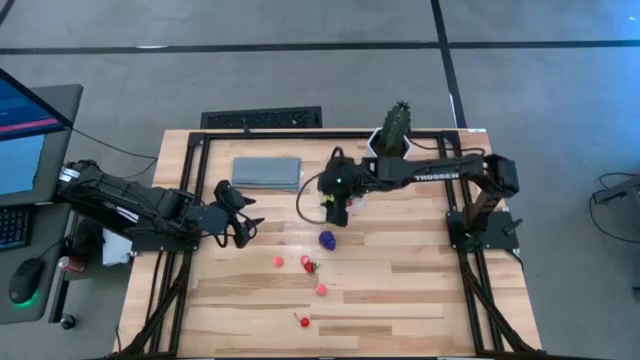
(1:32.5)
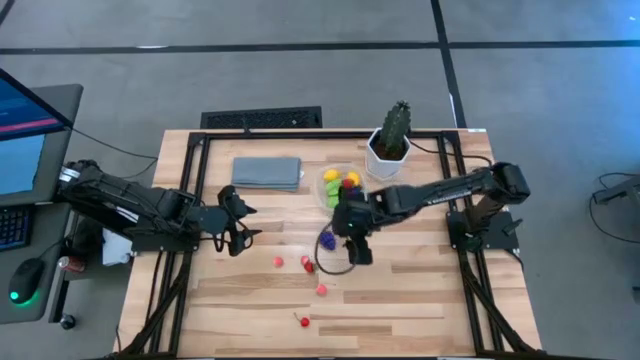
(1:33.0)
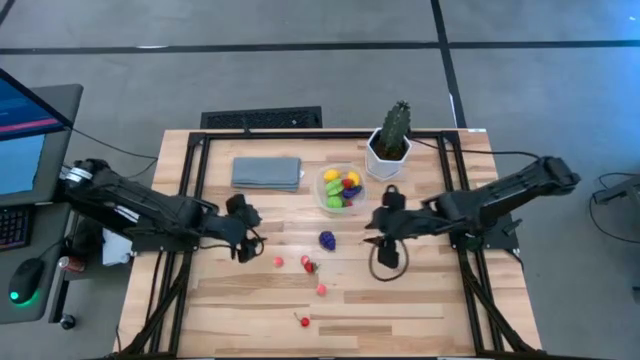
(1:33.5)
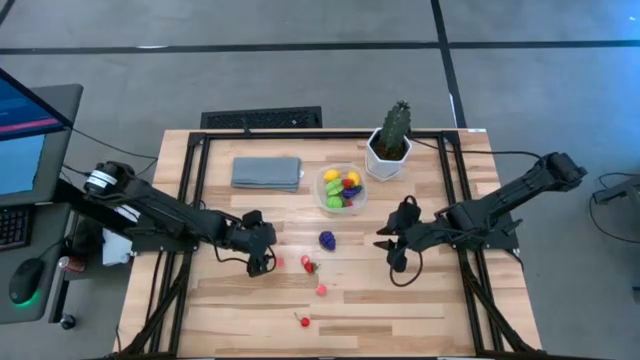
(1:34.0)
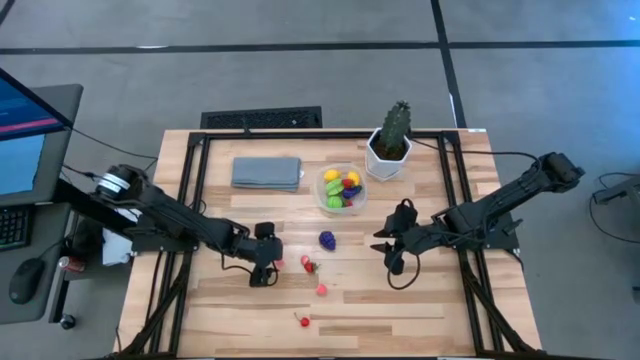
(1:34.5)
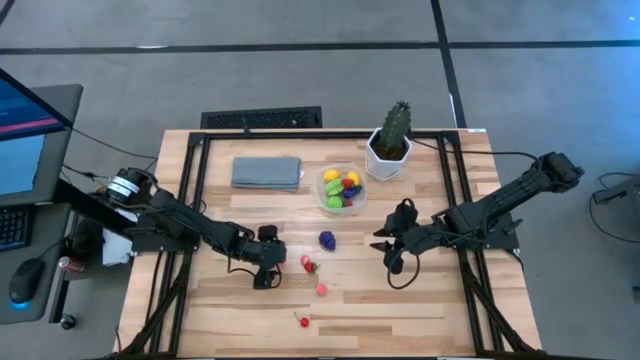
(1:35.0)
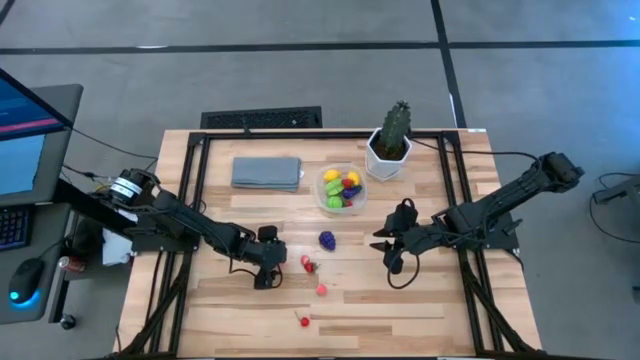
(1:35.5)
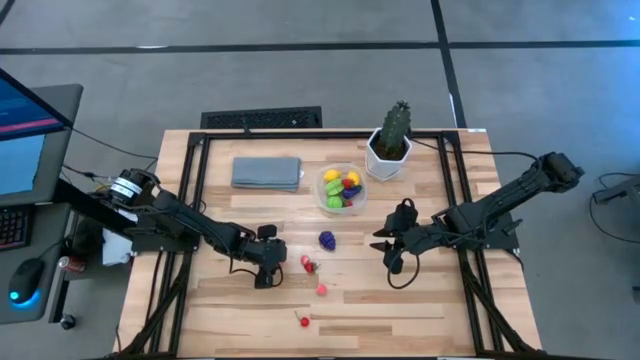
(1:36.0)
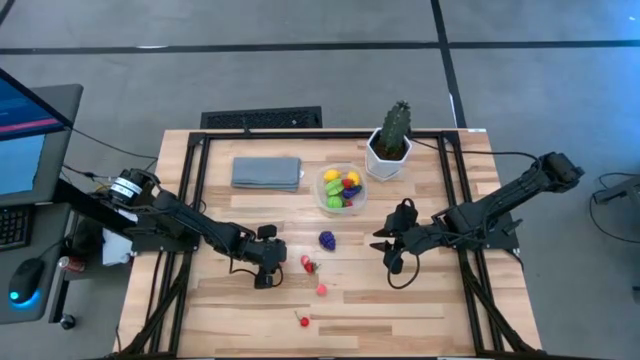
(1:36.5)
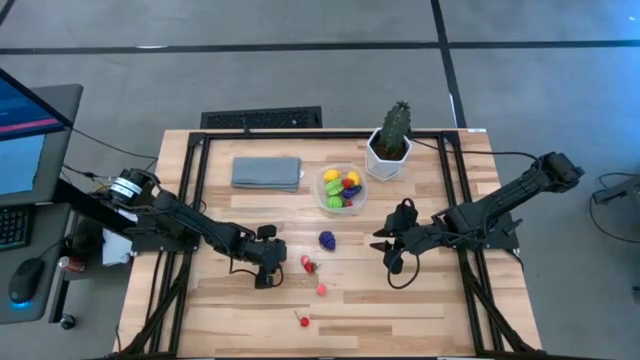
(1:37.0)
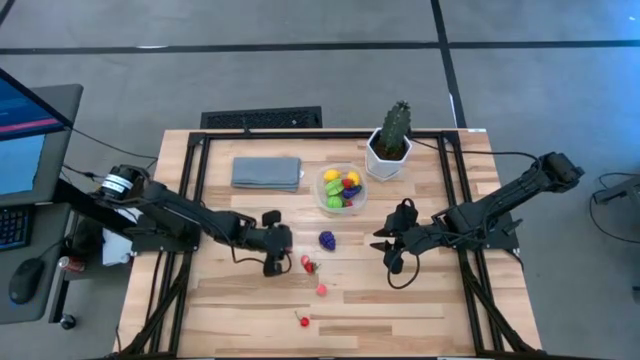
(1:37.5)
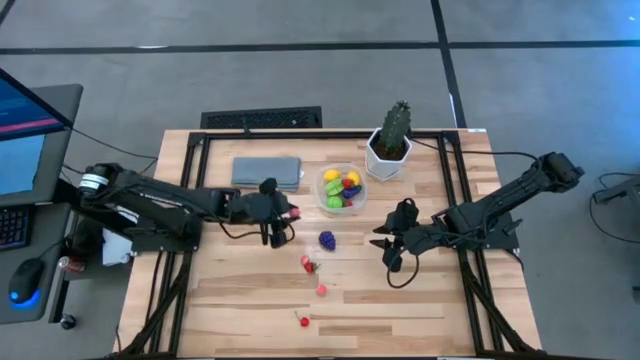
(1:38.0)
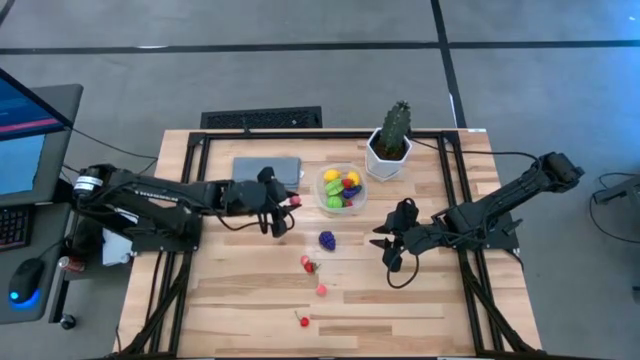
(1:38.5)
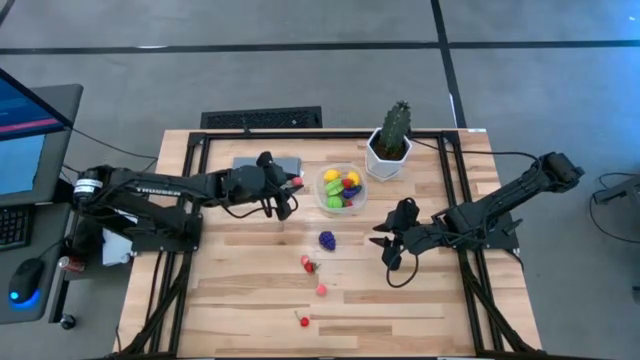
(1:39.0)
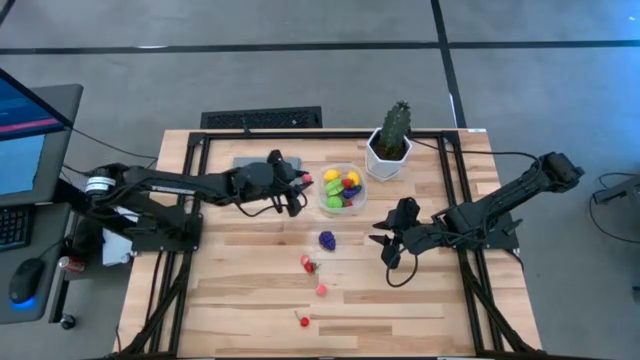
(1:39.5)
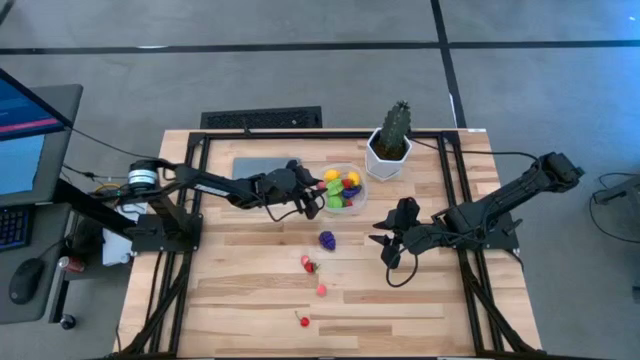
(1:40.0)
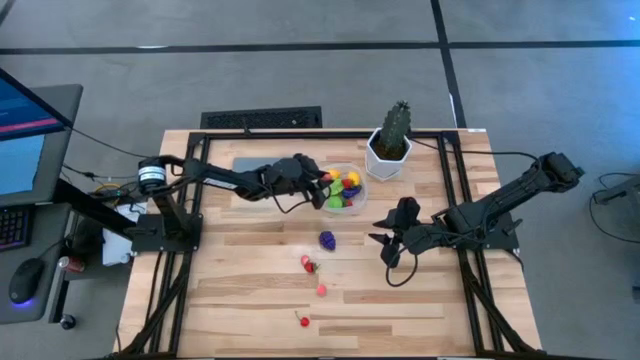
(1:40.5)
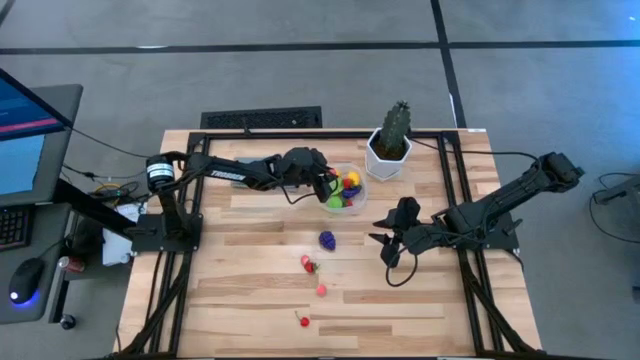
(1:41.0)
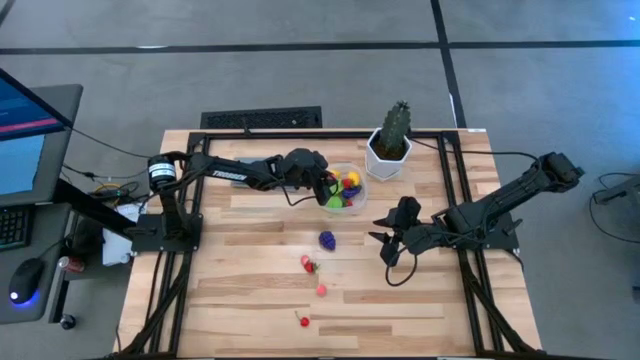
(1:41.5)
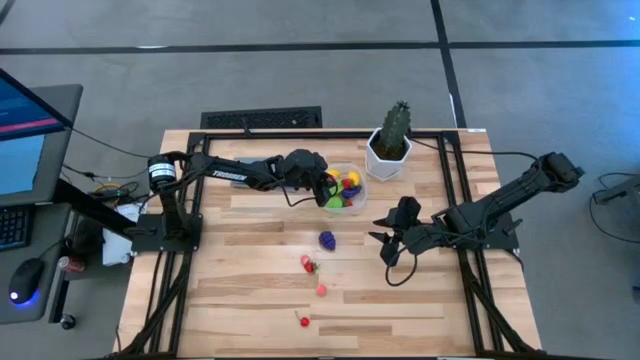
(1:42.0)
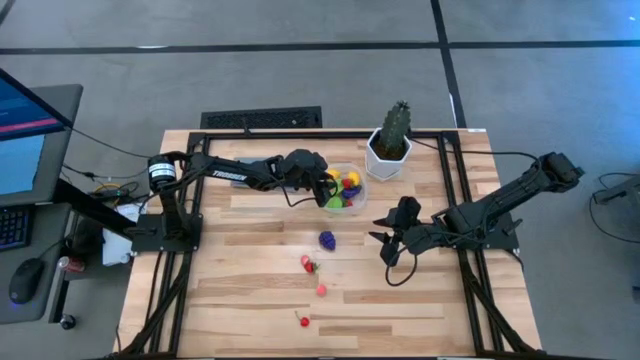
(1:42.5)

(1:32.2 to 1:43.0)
Task: Pick and placing Produce into tupperware
Put the top left peach into the transparent bin

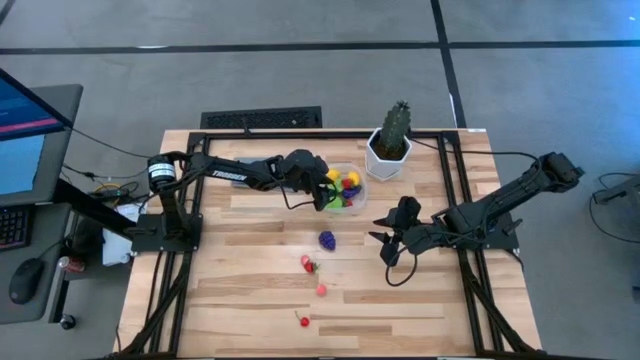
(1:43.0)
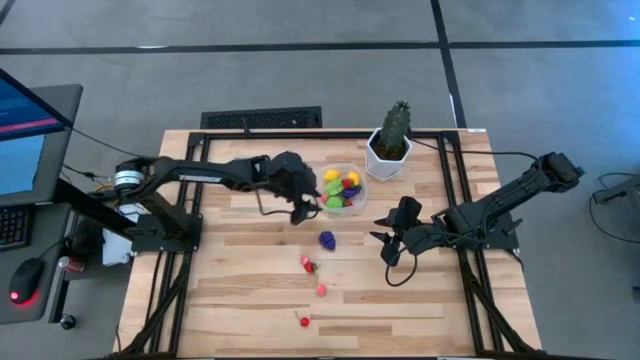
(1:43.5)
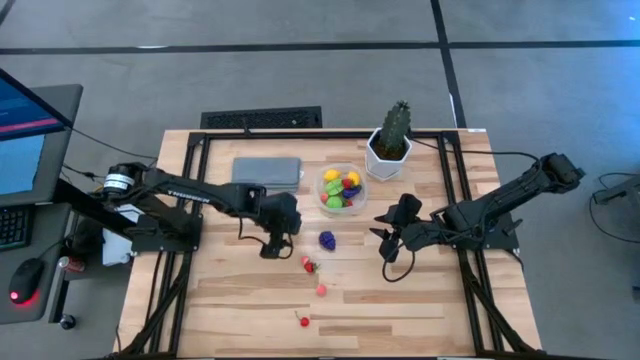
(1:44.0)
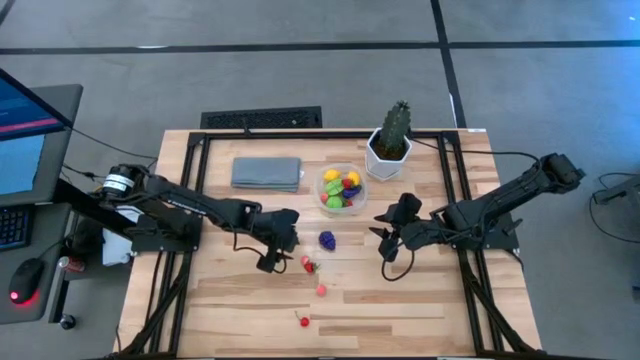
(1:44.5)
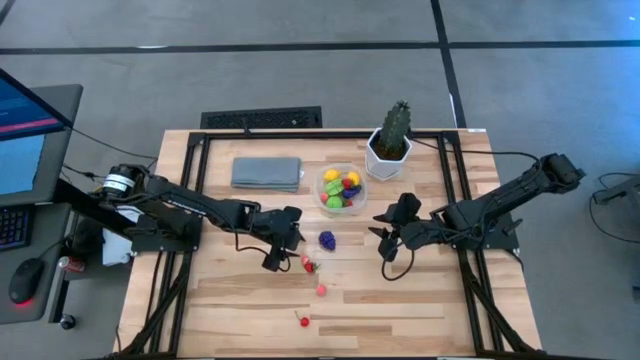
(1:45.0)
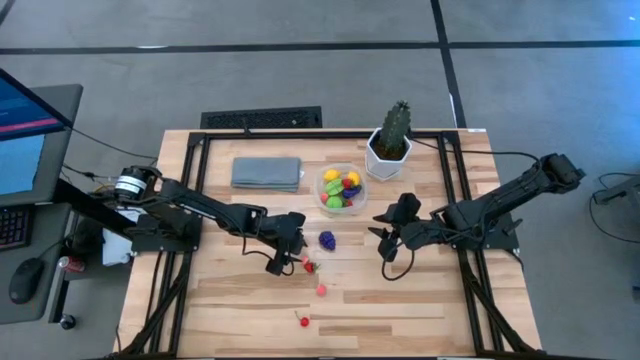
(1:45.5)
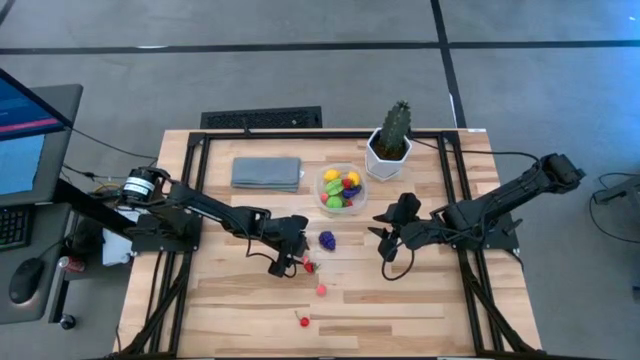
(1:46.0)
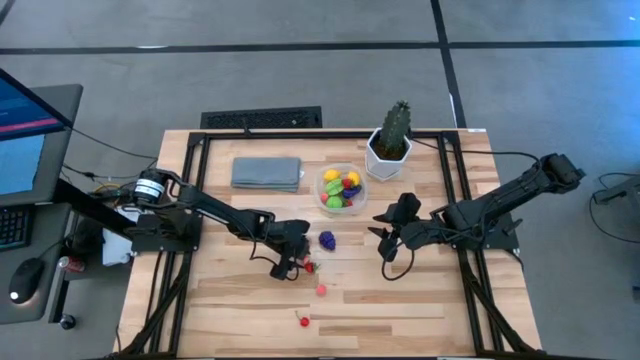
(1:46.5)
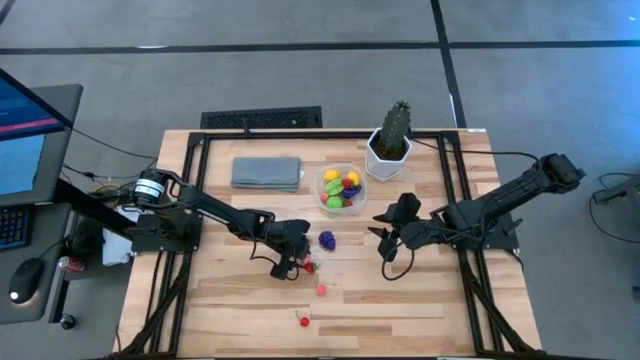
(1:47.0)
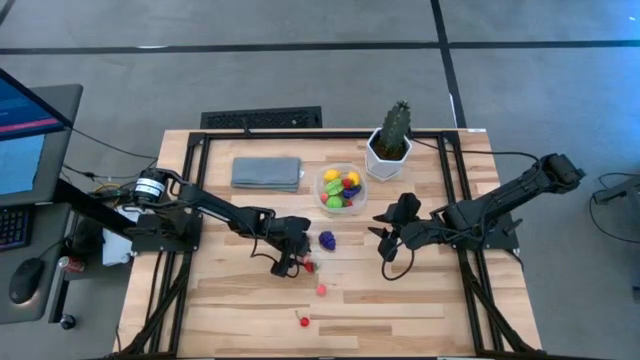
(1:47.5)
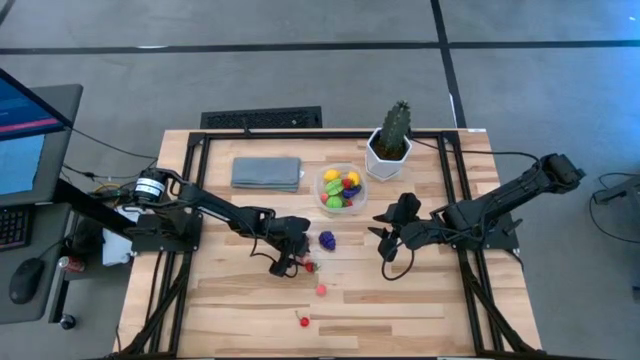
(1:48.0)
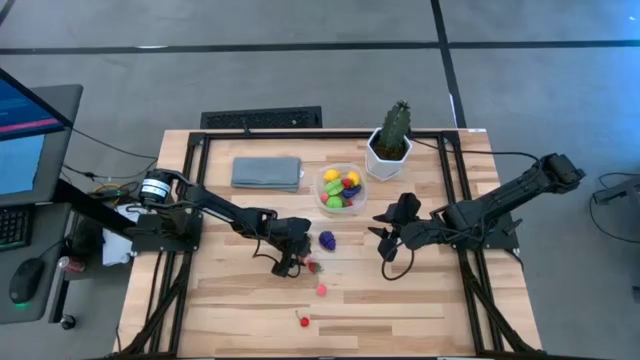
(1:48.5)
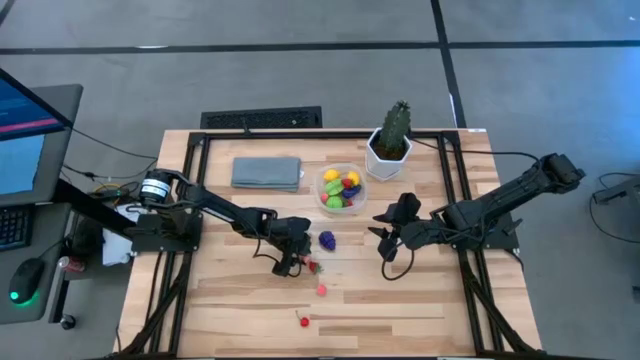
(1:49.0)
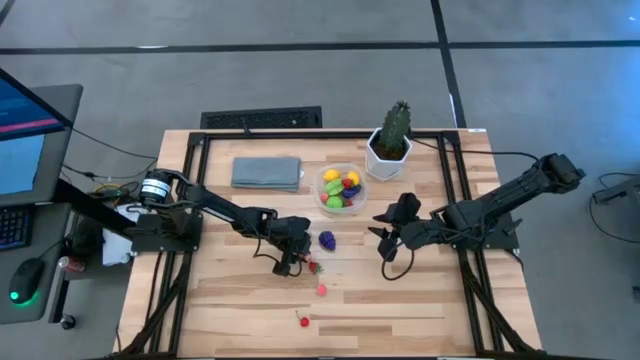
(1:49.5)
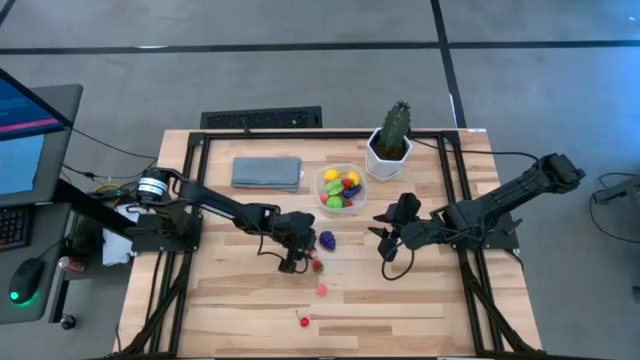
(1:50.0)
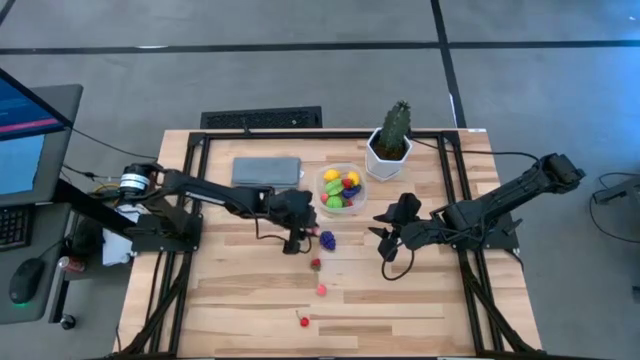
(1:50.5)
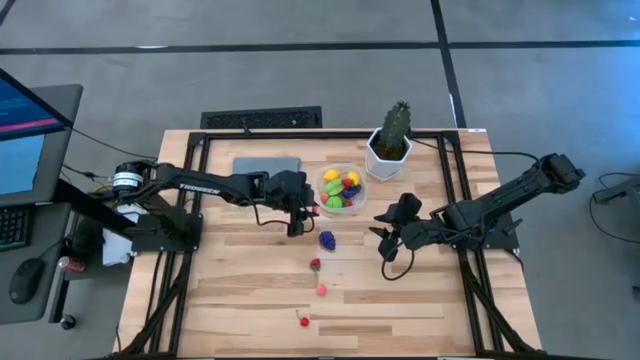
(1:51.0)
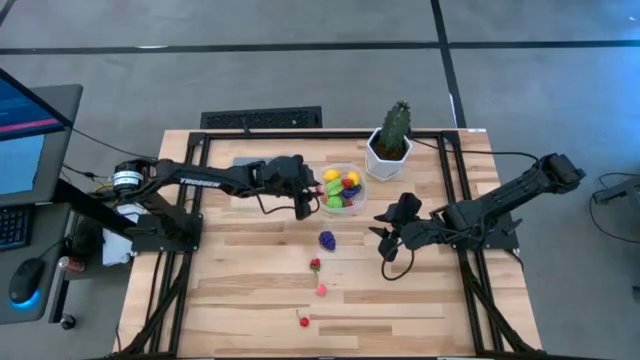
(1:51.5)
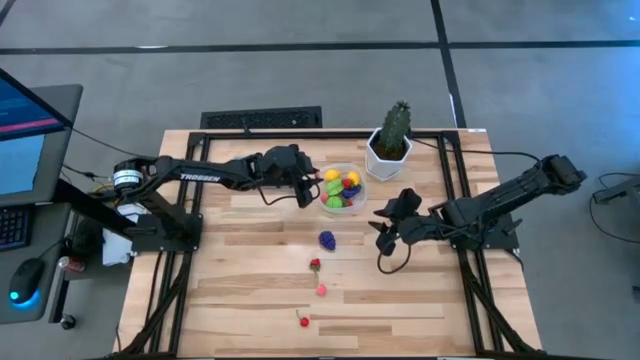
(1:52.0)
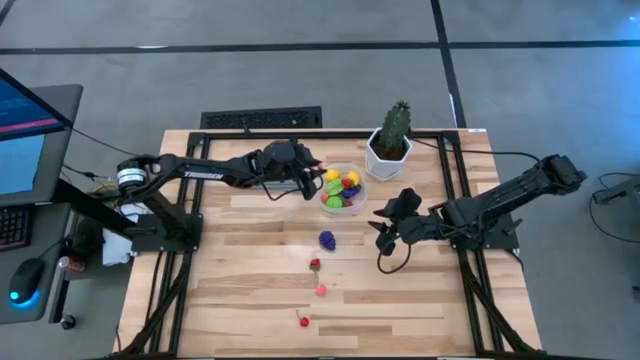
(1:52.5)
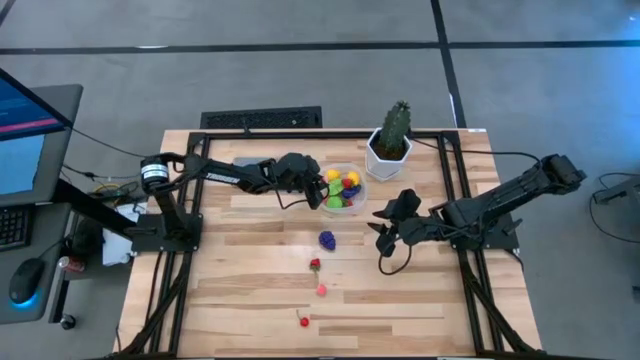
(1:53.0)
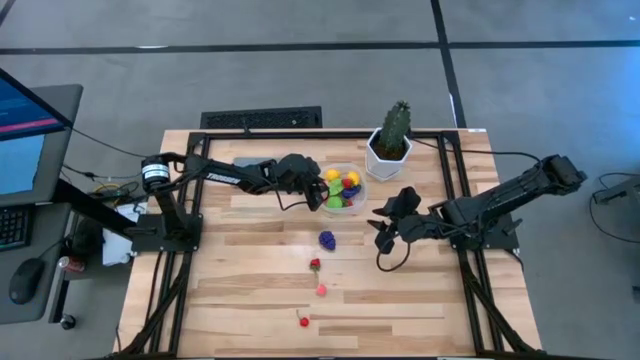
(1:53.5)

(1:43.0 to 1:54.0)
Put the top peach into the transparent bin
